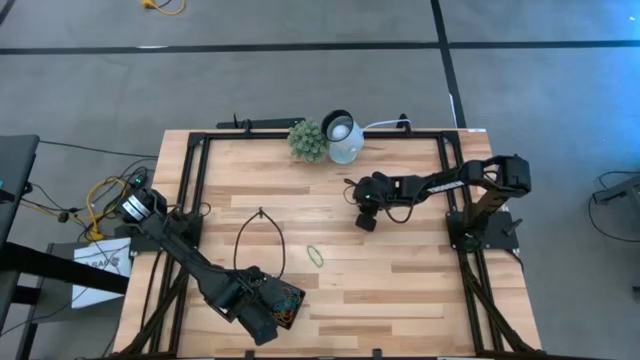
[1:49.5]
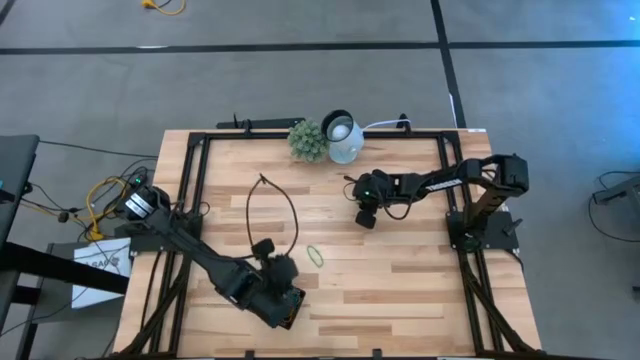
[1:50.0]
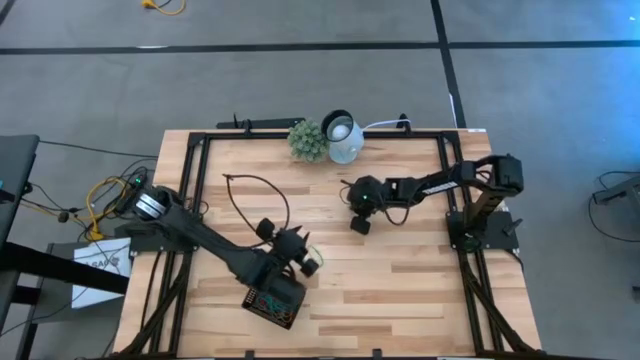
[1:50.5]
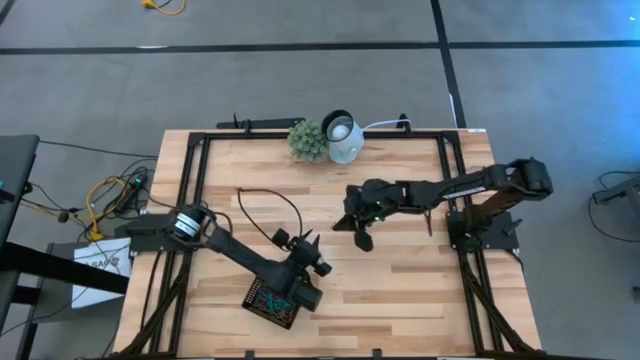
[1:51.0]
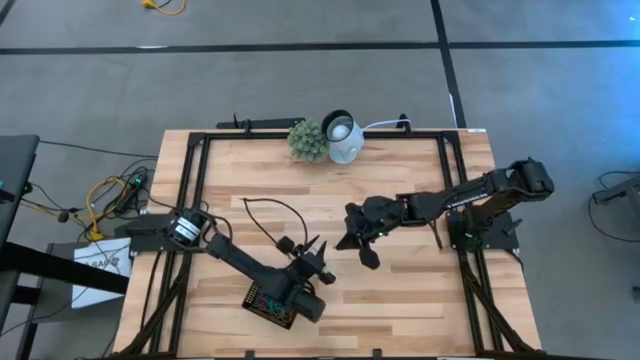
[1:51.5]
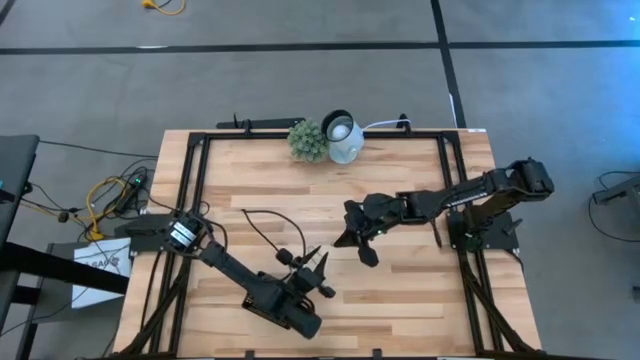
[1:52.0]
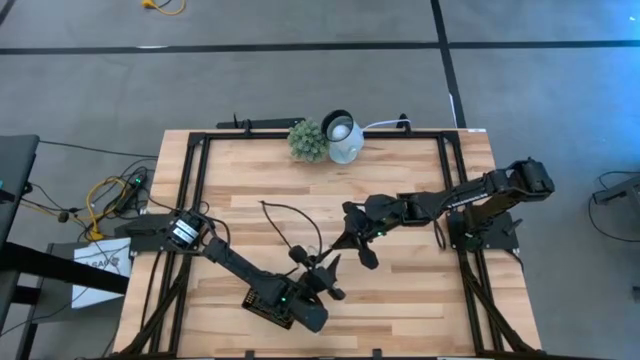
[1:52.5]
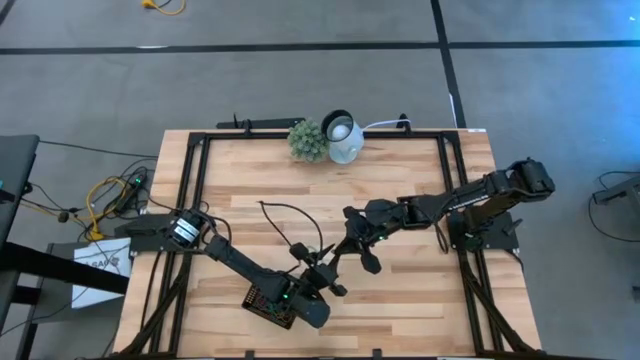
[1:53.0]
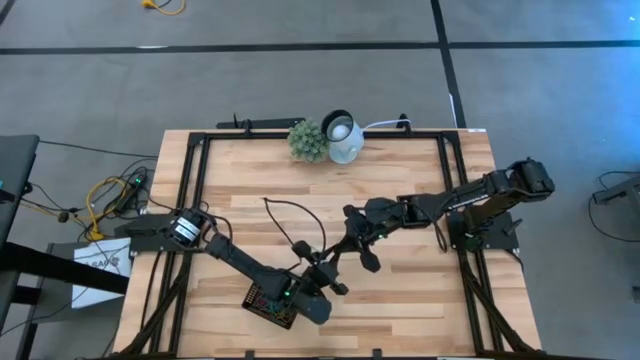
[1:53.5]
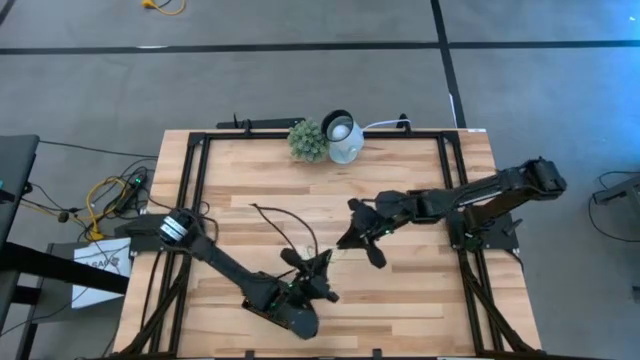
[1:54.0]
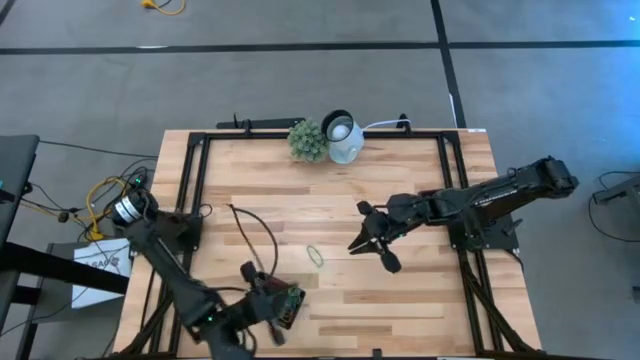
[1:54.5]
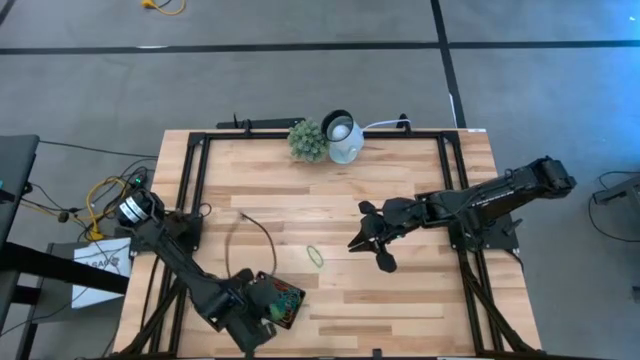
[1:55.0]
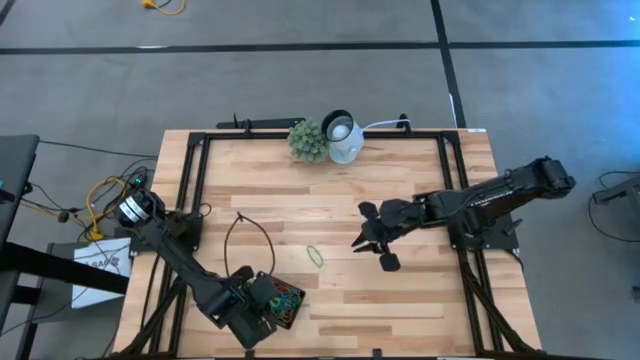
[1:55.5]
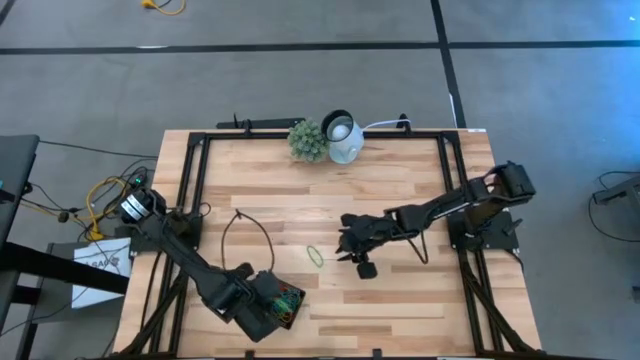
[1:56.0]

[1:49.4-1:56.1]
Task: Pick and place items into bin
Put the green rubber band into the black bin

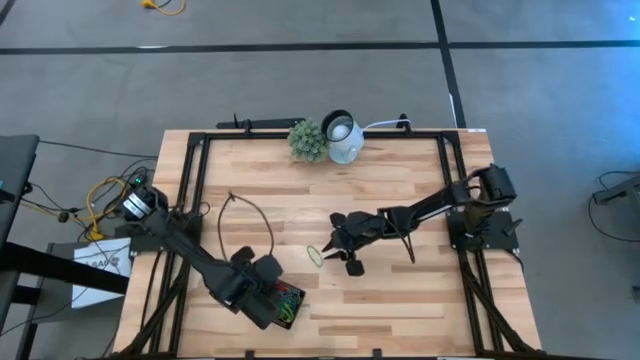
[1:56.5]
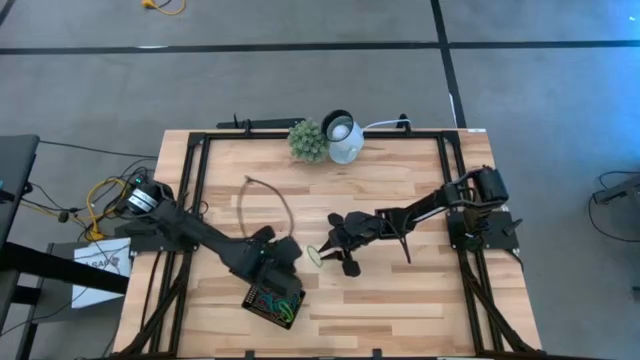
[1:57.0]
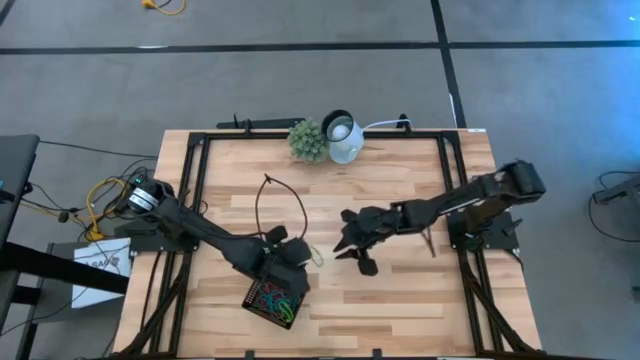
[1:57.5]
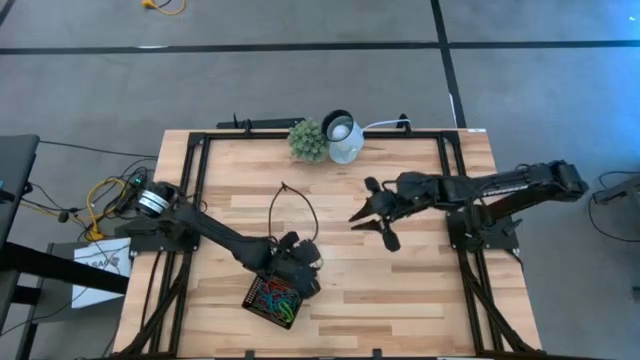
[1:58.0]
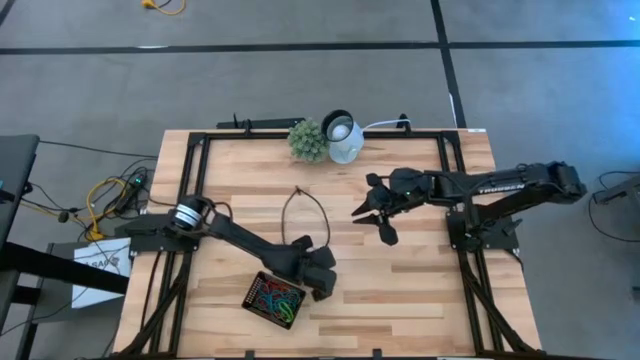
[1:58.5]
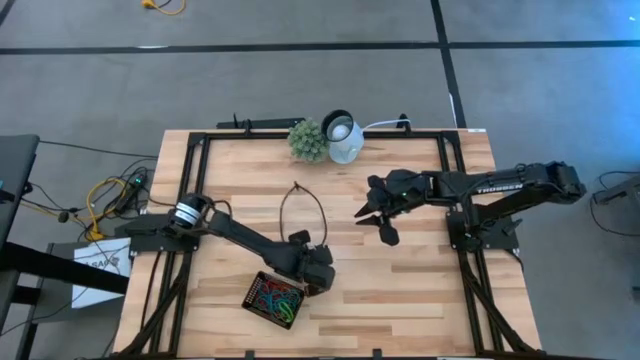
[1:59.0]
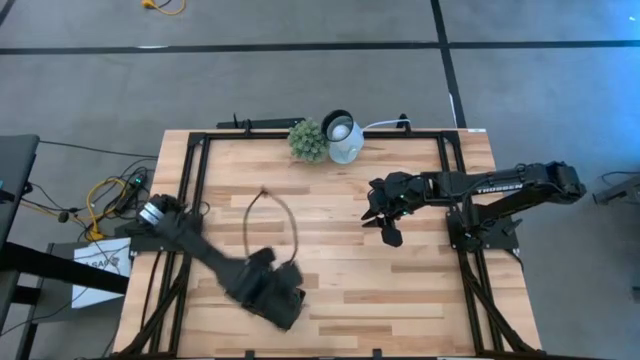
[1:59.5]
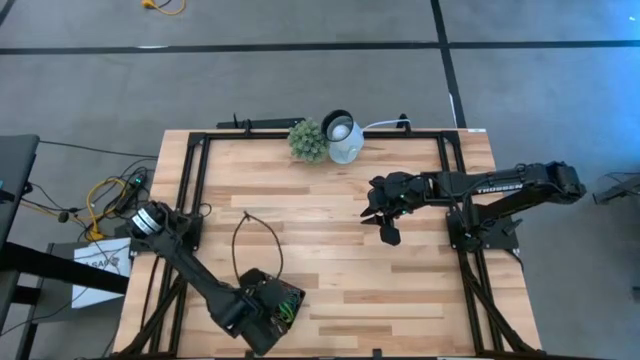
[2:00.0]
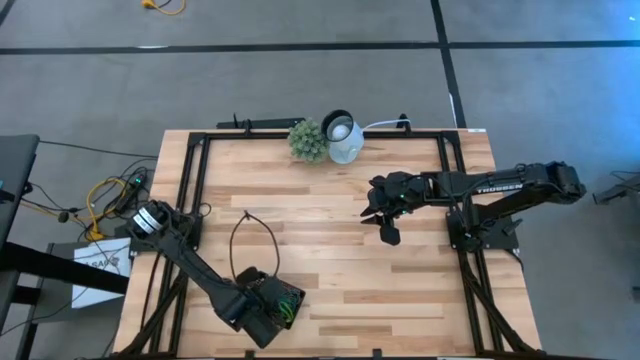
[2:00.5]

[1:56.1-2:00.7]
Put the green rubber band into the black bin

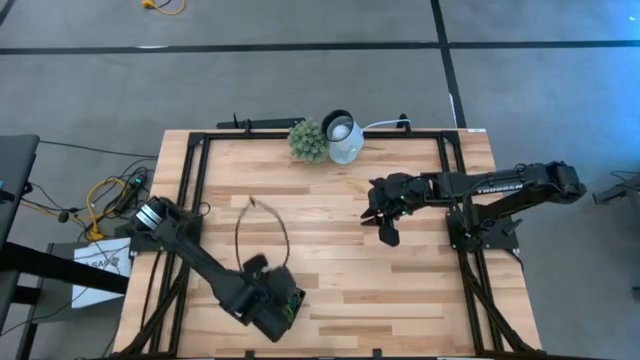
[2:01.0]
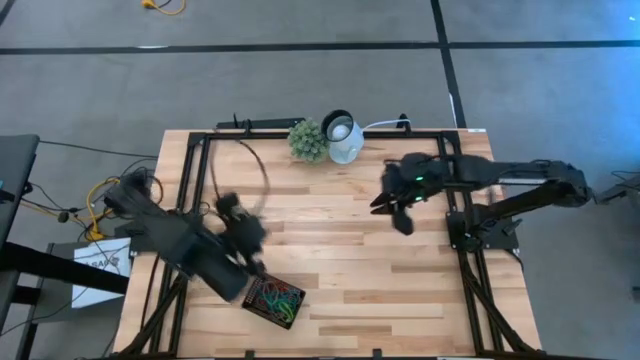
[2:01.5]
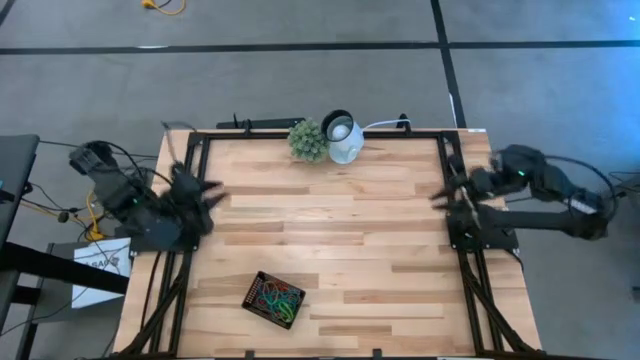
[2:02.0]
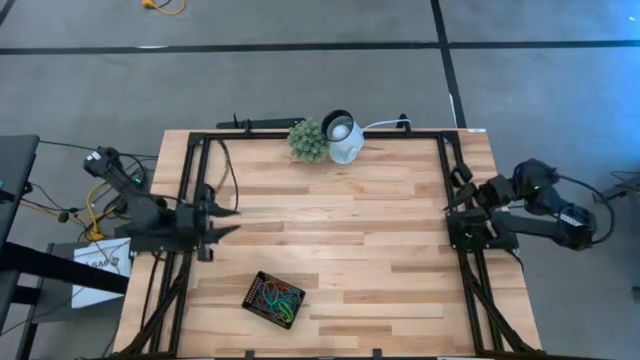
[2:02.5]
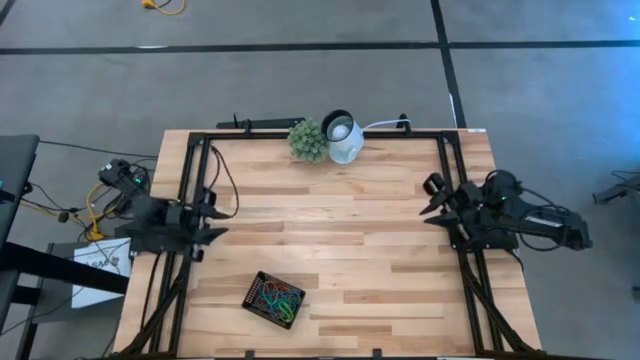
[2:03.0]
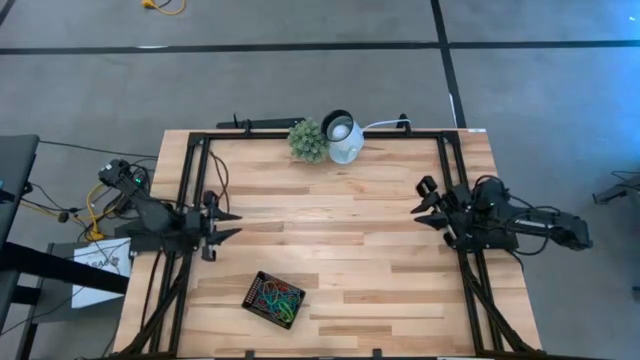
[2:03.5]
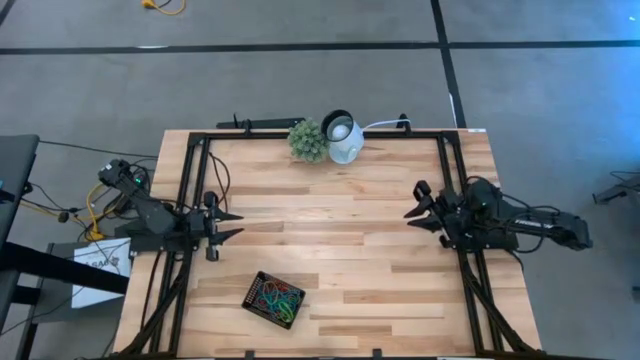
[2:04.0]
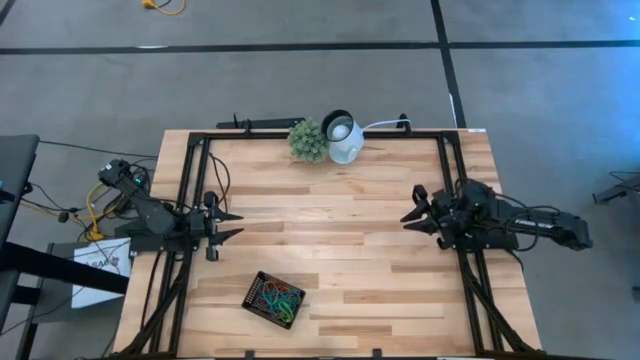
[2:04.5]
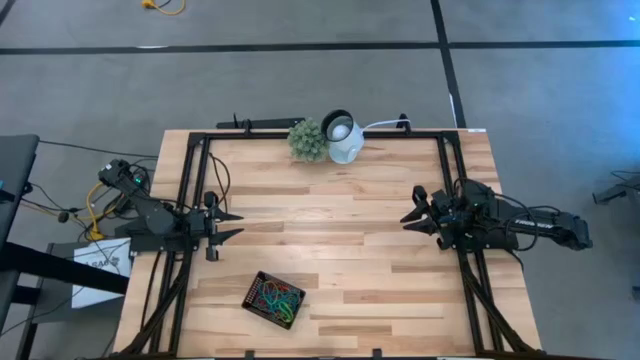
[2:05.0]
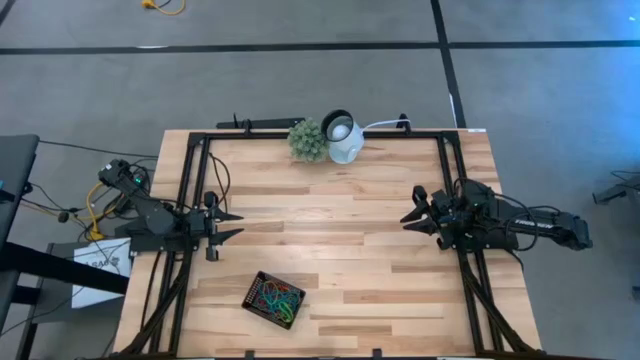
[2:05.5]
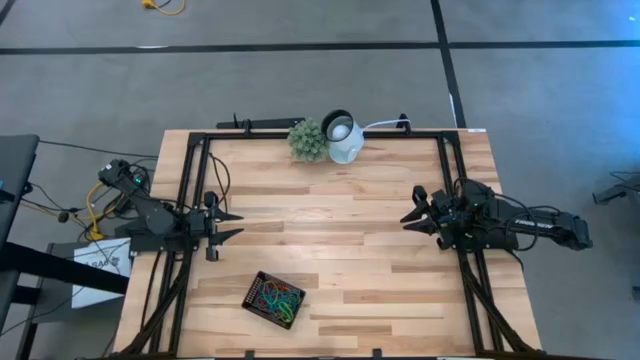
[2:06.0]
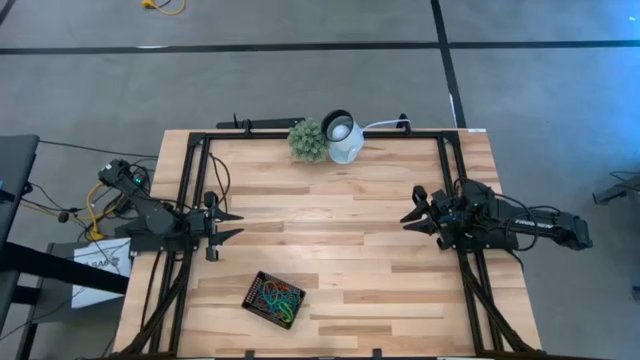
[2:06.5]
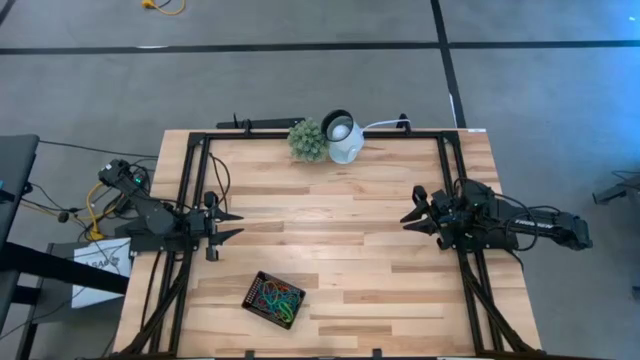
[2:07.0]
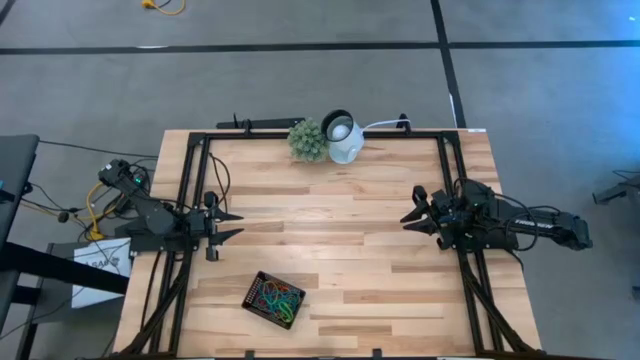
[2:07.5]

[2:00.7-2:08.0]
Return to Home Position

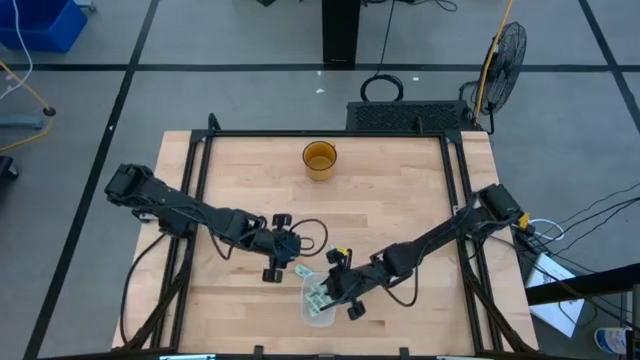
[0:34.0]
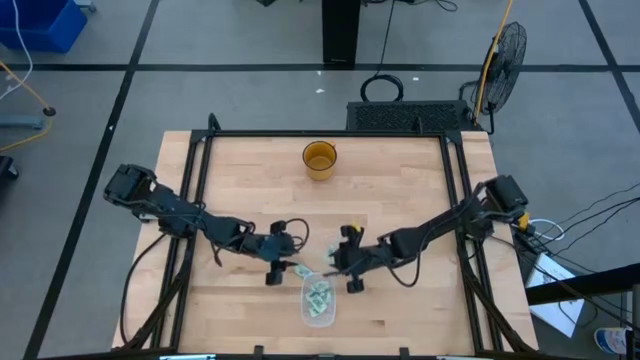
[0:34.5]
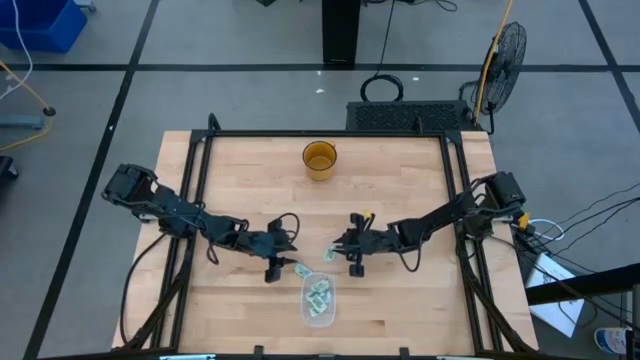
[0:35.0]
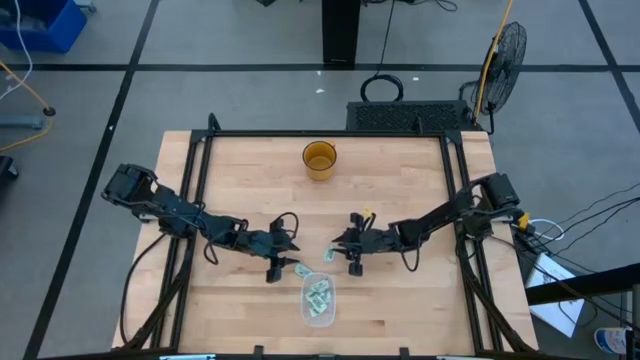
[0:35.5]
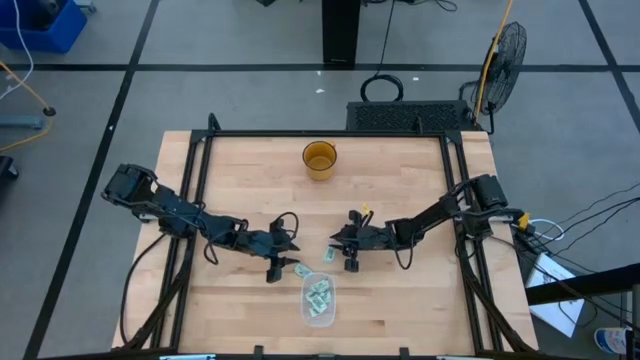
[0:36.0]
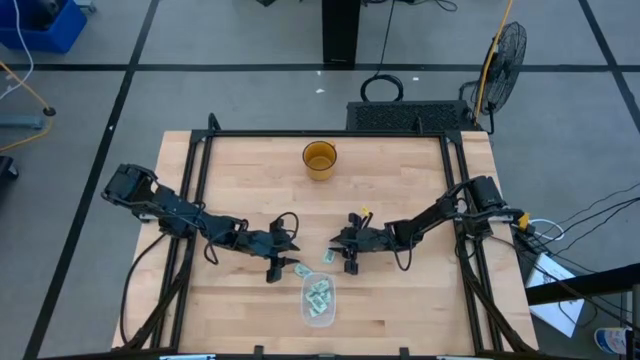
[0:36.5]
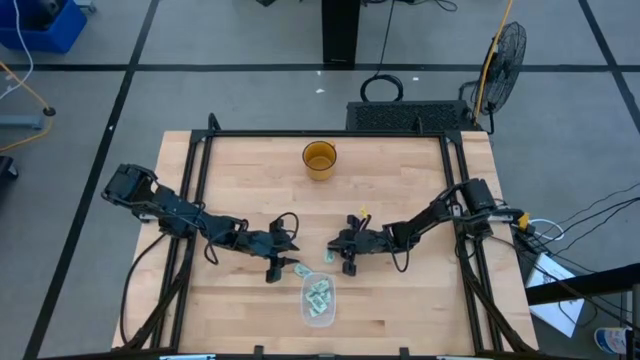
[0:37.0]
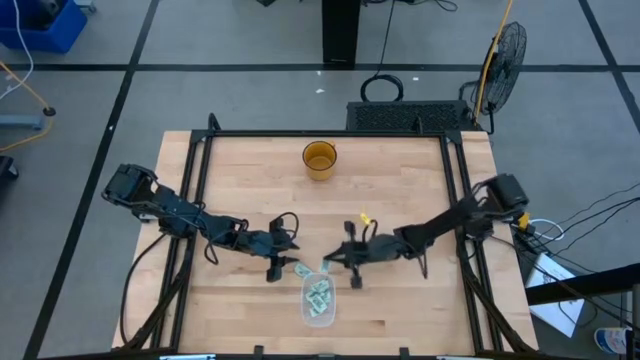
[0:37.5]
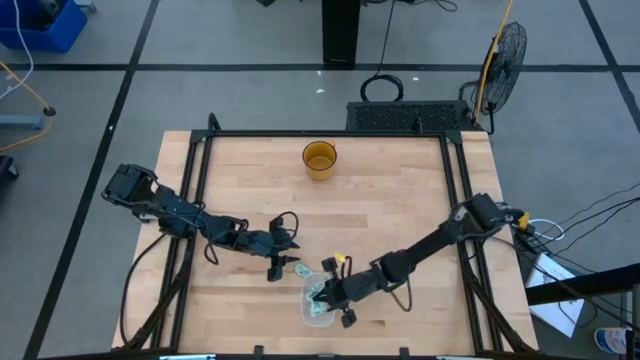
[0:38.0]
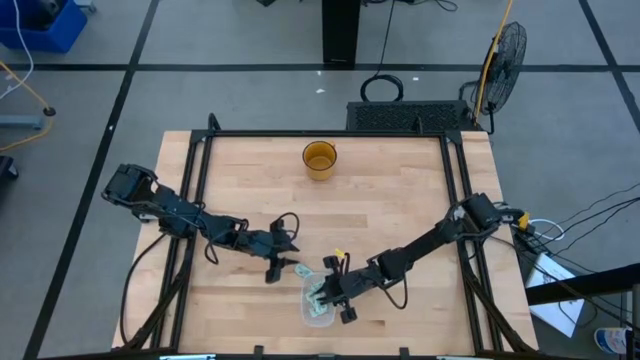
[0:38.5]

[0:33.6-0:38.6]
Task: Pick and place Stevia / Truvia into bins
Put the green stevia packet into the transparent container
